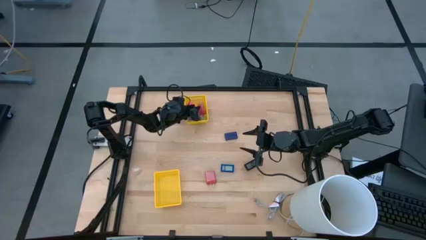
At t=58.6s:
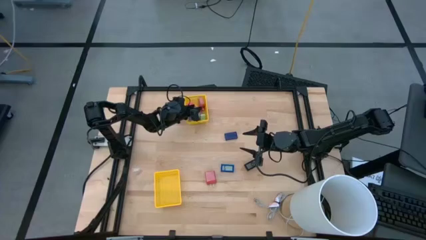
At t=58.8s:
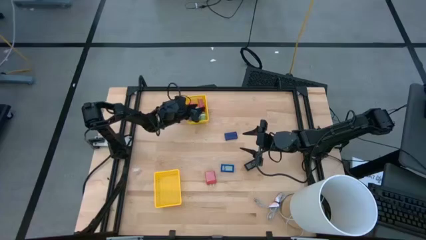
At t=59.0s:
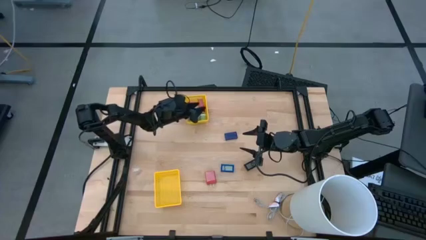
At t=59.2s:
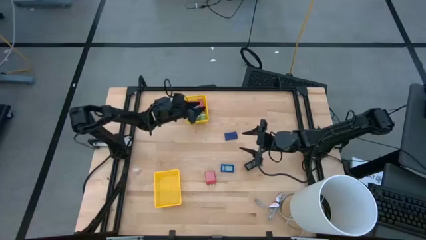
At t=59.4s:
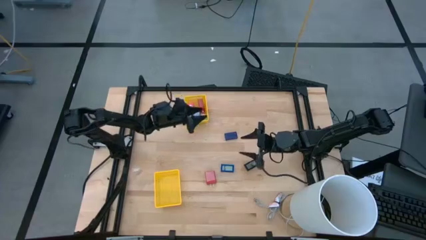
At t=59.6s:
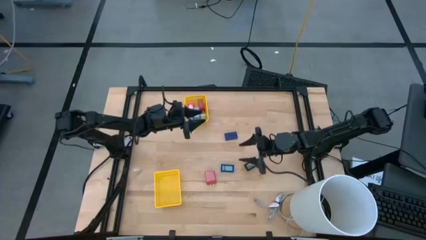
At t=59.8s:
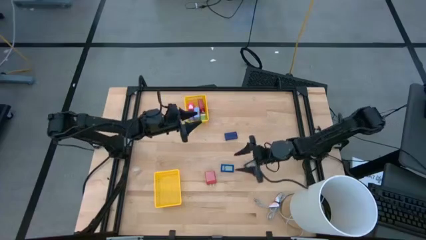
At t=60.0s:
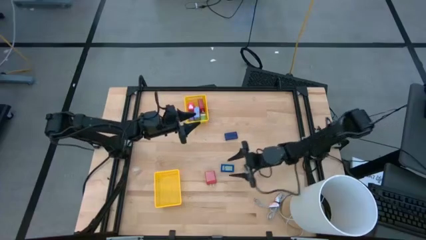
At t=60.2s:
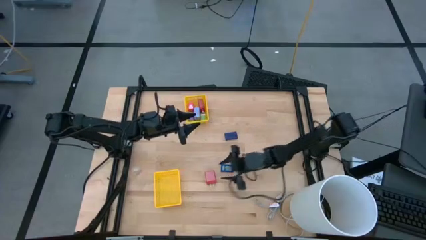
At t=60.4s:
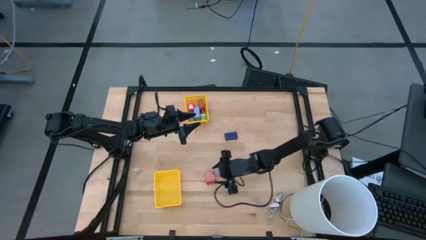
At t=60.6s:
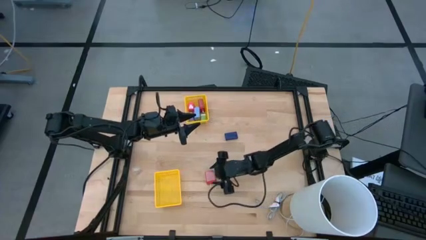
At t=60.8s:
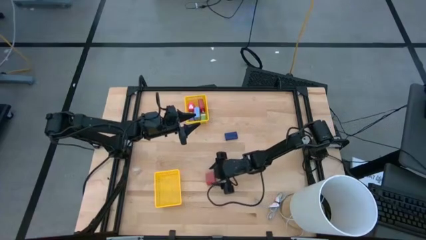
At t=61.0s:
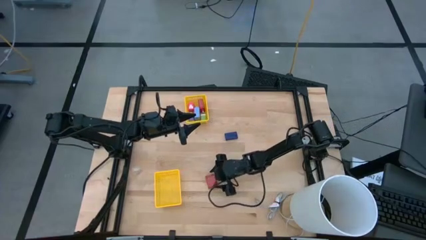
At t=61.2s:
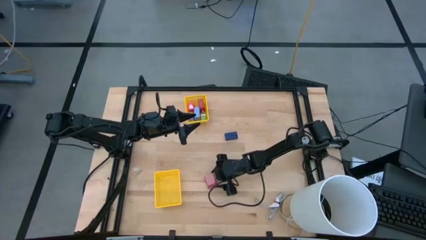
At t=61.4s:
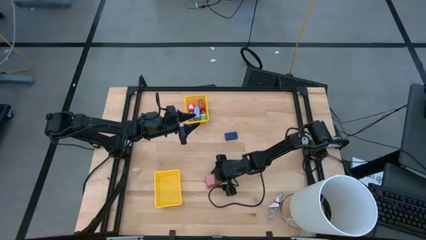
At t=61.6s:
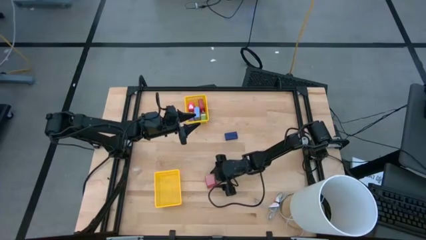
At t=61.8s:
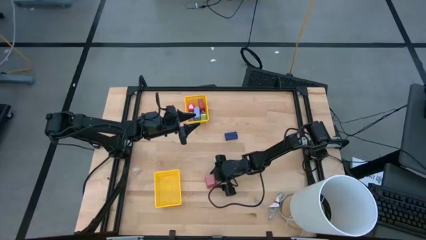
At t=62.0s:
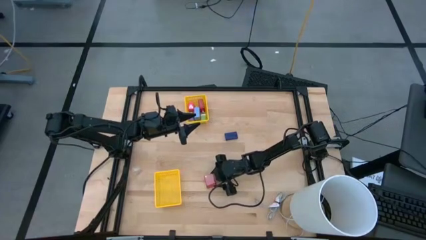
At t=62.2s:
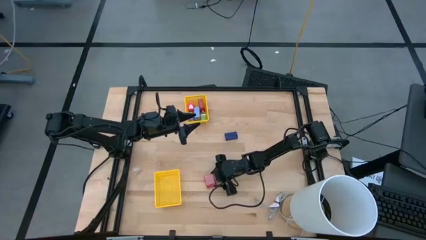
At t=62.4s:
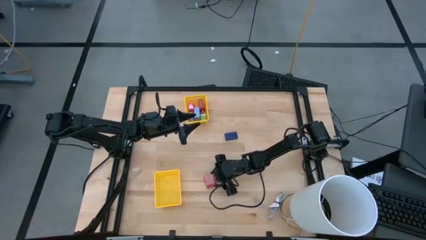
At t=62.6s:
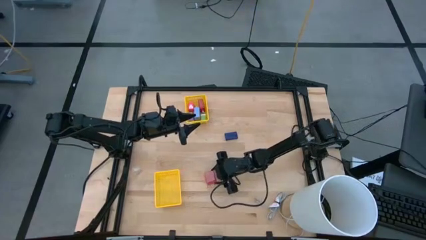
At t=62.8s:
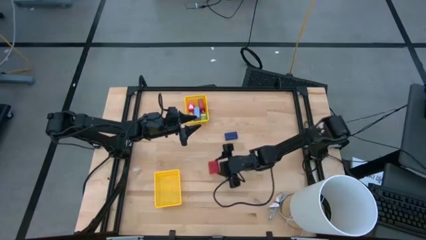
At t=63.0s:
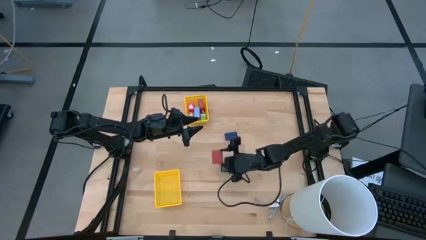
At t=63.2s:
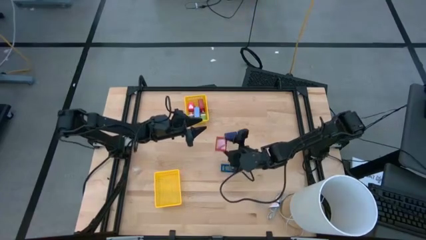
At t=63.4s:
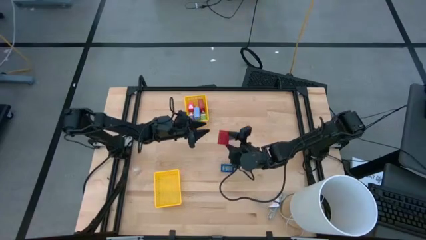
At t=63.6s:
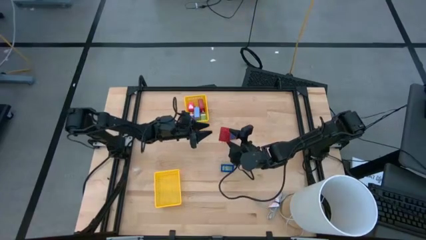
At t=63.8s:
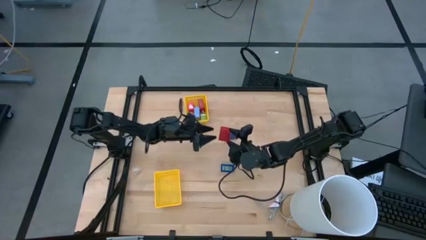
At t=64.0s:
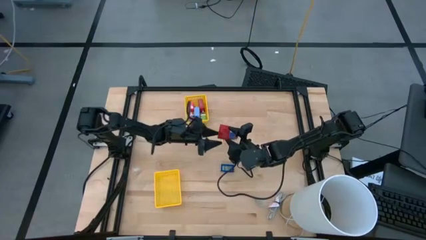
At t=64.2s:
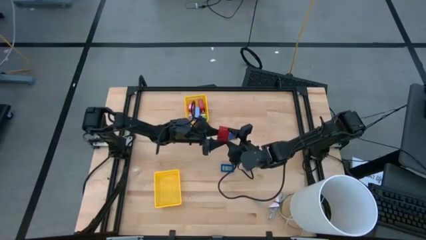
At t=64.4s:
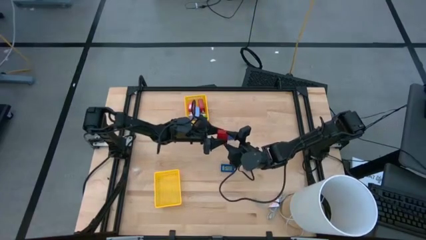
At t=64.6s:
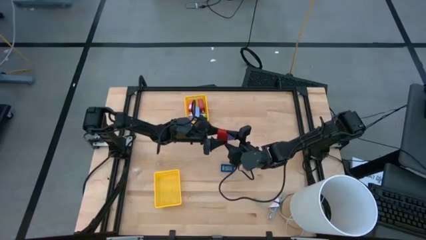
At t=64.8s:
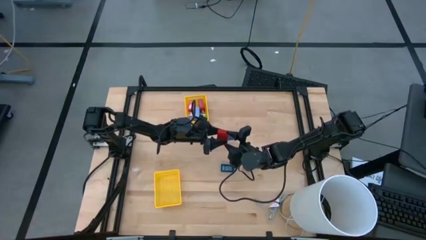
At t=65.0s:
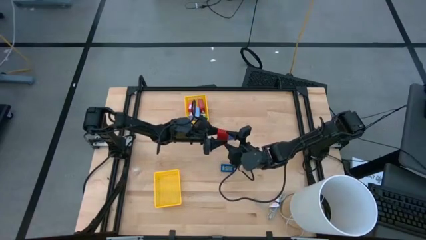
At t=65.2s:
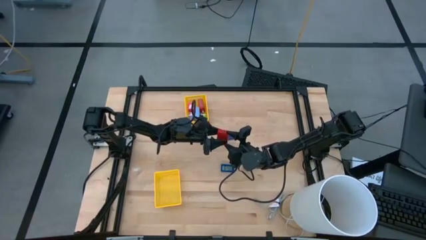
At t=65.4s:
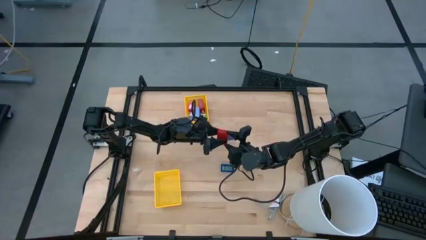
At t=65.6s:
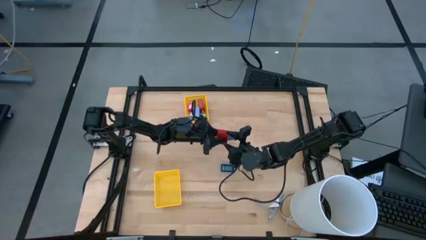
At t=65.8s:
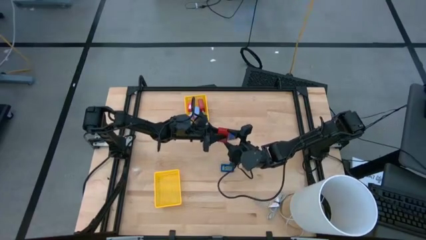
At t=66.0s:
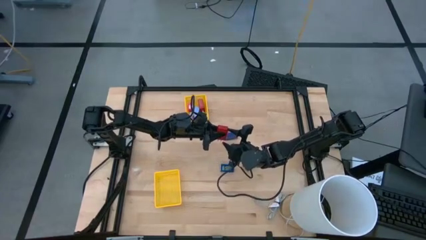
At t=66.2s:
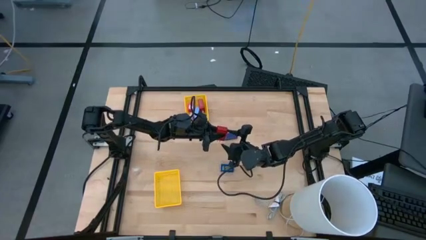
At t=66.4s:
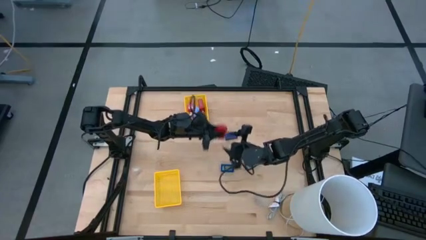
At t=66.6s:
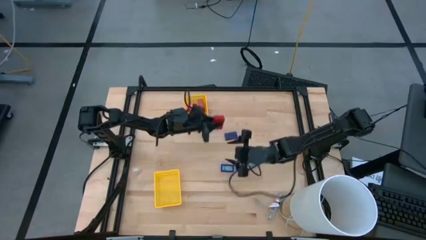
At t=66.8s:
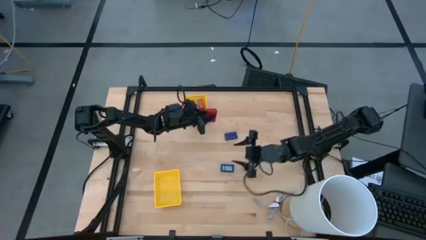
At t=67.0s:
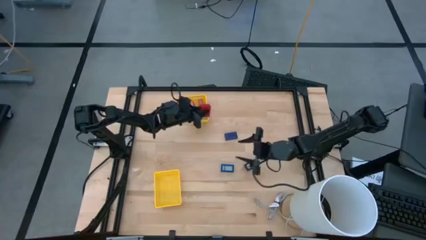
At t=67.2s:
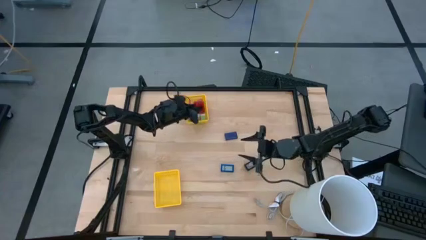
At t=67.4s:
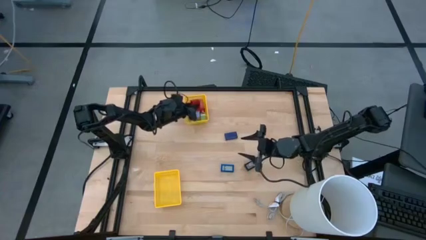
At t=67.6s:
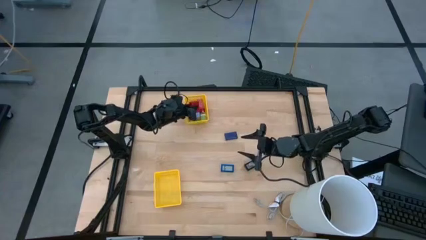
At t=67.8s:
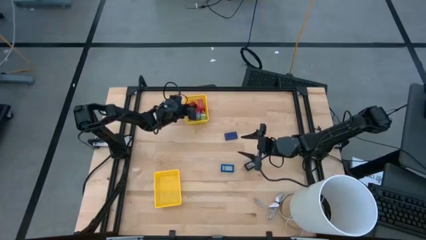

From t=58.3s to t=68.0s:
Task: Pick & Place Office items
Put the red charger adapter into the top yellow bin

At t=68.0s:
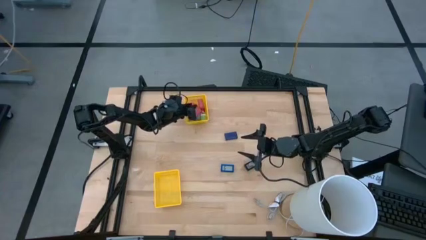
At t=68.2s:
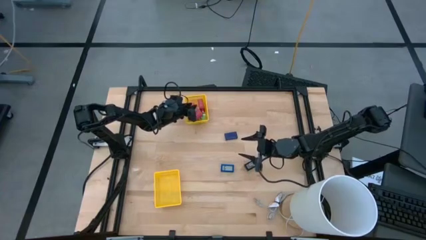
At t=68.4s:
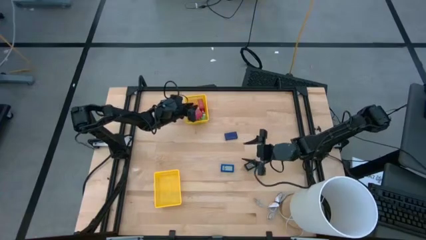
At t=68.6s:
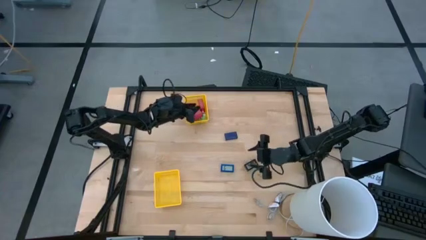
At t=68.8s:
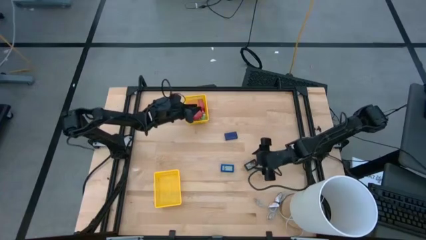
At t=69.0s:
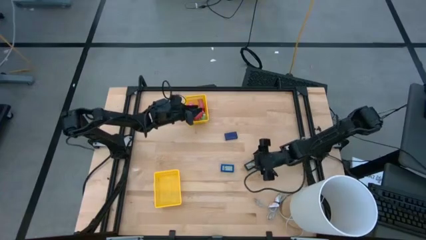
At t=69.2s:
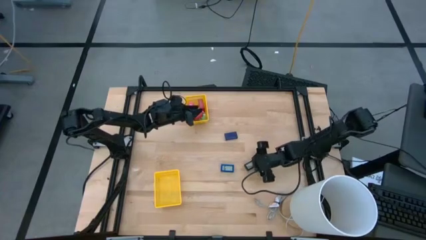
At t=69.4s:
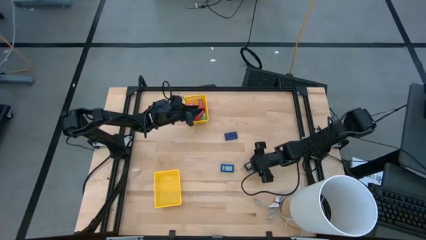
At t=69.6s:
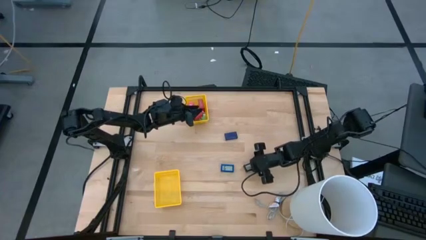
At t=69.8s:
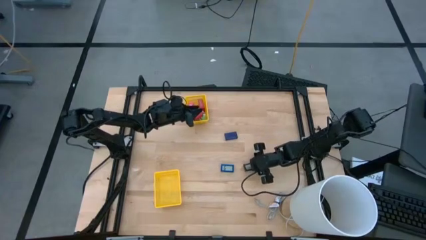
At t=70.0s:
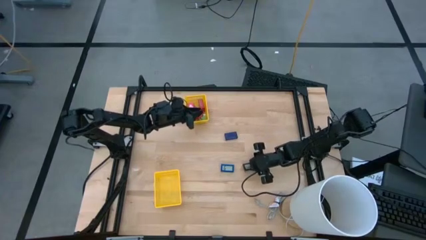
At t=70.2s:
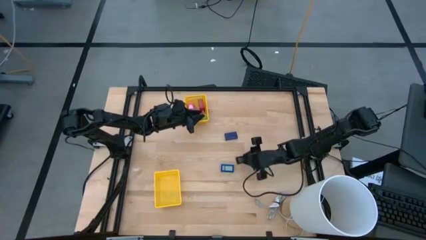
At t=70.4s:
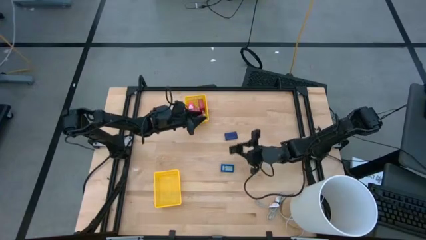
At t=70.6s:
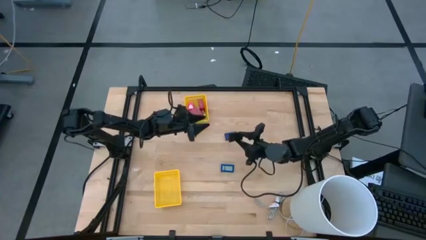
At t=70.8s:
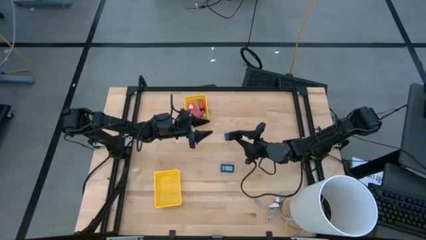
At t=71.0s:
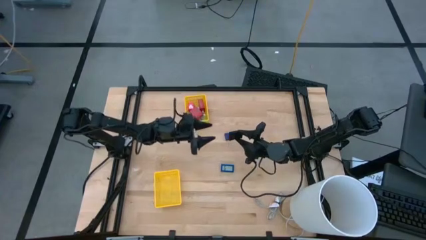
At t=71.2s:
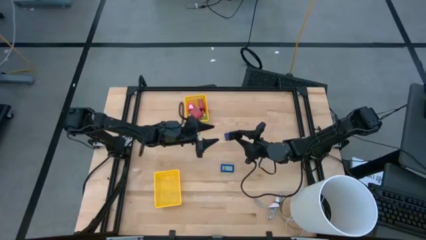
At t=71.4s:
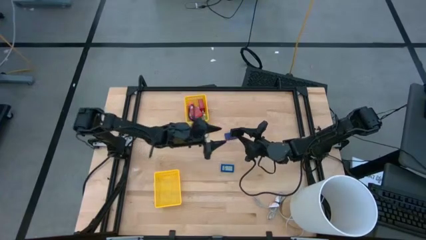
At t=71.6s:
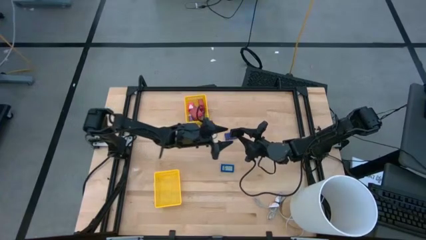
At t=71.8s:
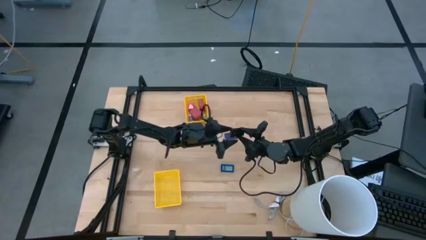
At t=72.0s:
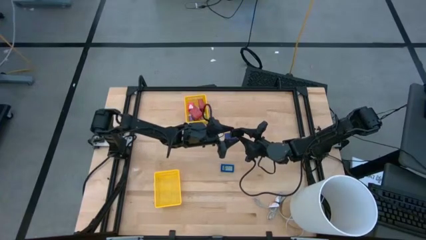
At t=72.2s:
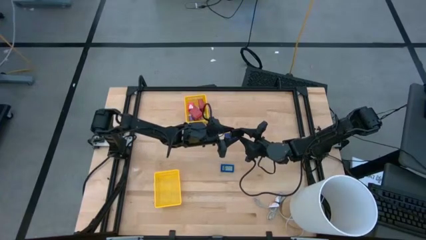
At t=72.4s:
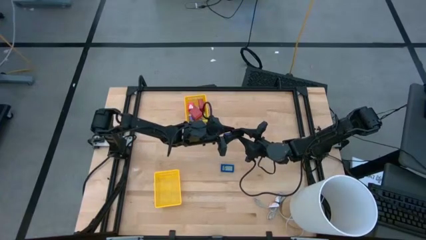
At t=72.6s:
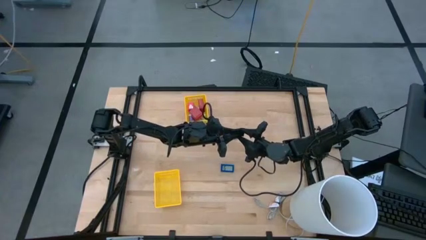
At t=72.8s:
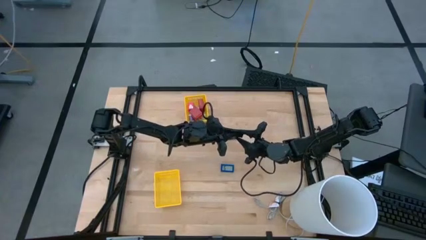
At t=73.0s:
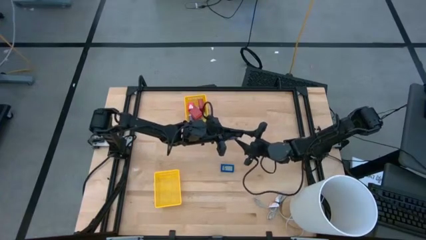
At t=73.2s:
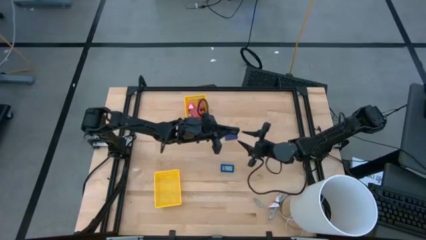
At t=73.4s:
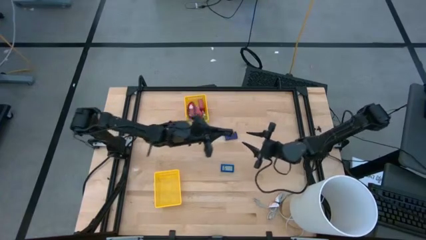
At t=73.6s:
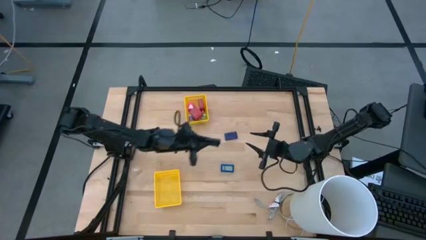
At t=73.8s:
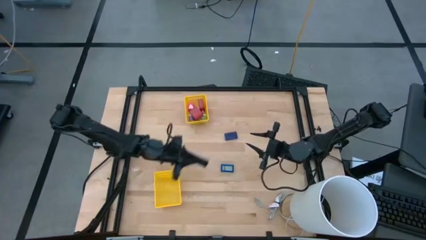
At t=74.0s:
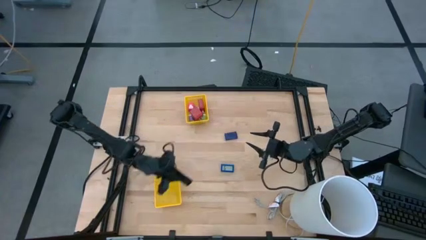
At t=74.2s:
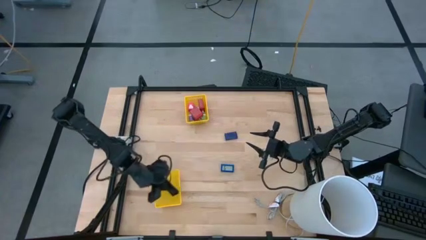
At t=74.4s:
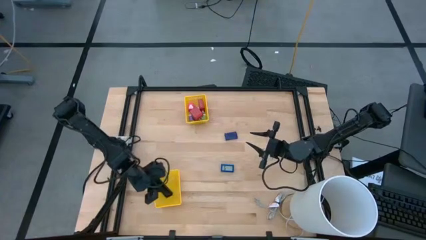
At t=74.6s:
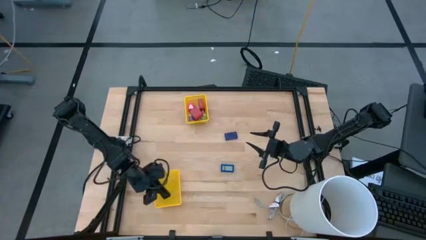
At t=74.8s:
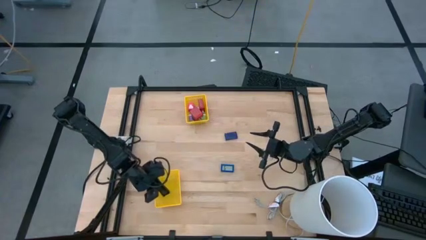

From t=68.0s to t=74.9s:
Put the black digital clock into the bottom yellow bin
